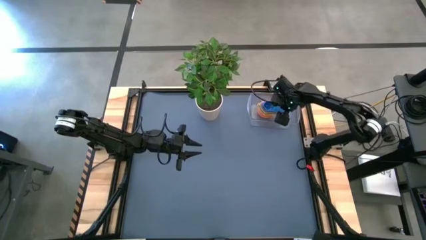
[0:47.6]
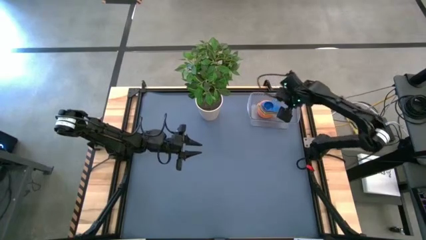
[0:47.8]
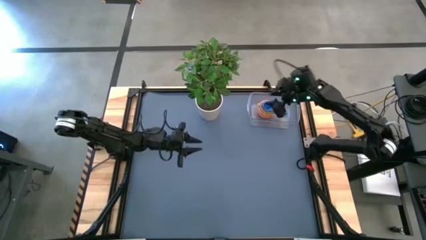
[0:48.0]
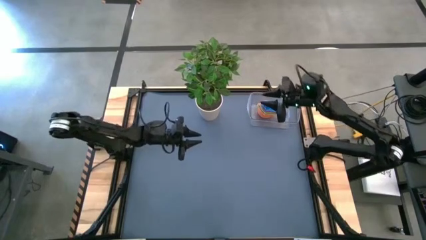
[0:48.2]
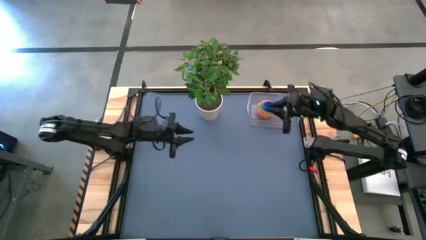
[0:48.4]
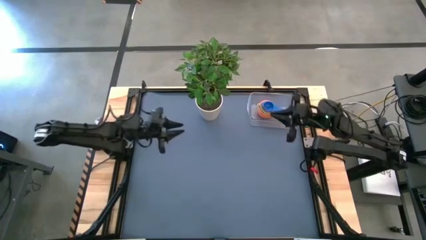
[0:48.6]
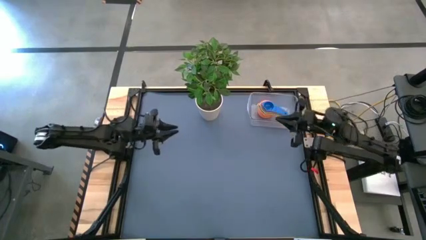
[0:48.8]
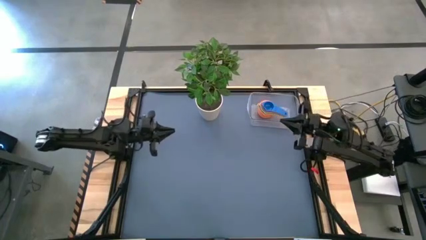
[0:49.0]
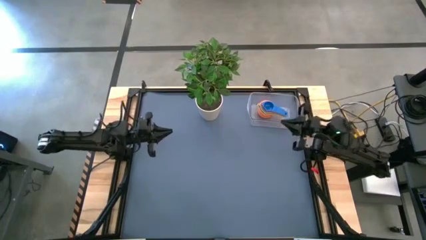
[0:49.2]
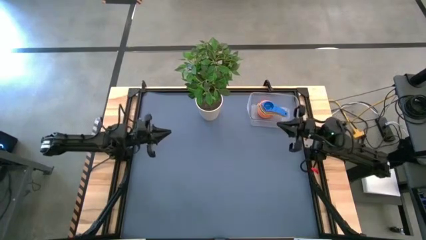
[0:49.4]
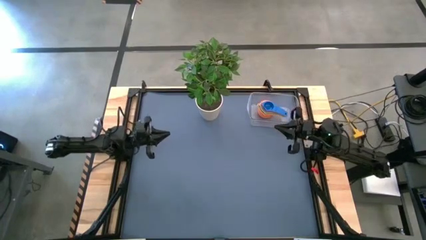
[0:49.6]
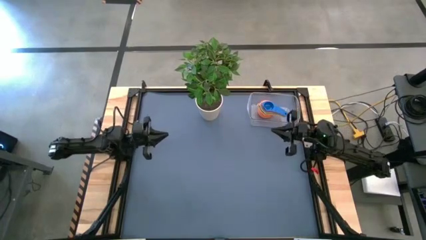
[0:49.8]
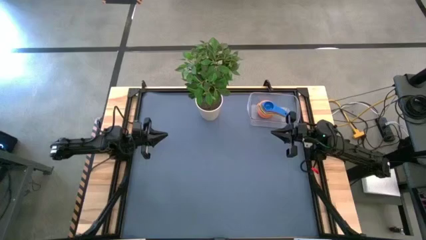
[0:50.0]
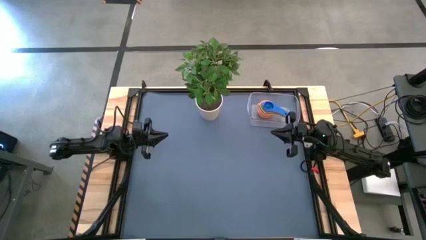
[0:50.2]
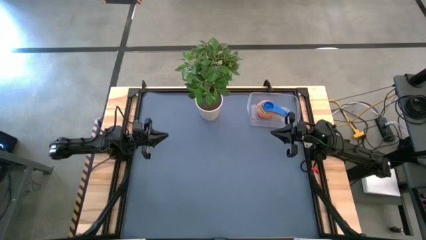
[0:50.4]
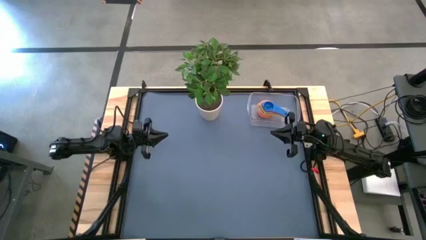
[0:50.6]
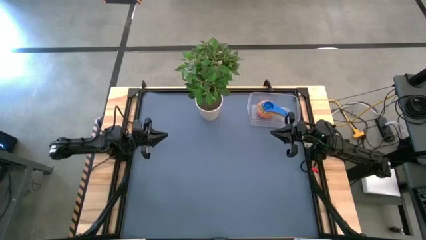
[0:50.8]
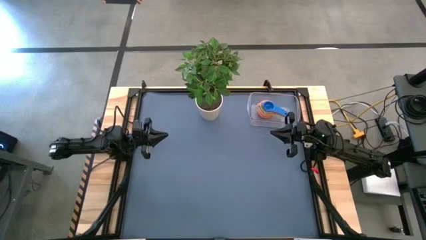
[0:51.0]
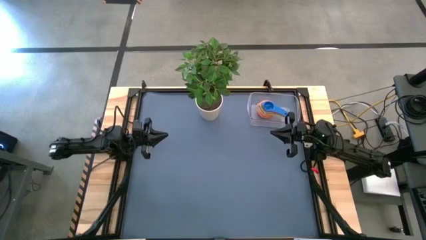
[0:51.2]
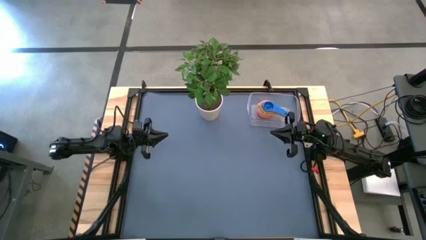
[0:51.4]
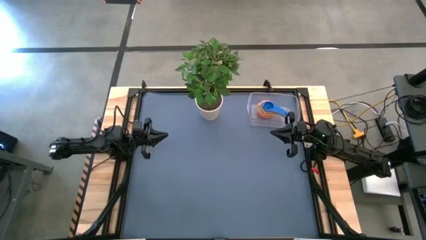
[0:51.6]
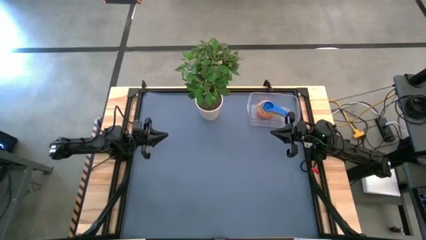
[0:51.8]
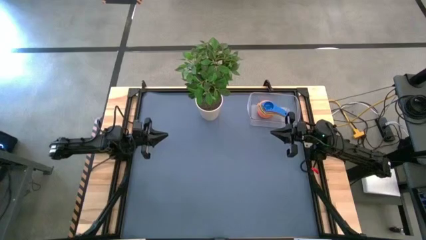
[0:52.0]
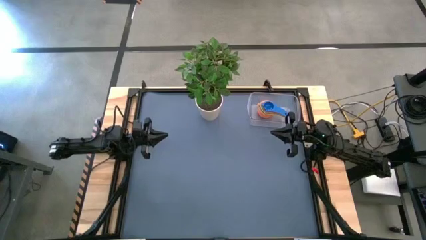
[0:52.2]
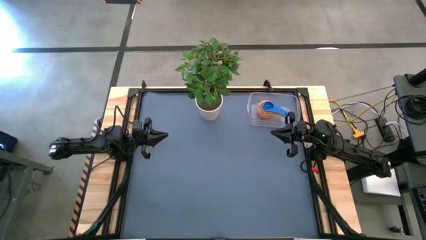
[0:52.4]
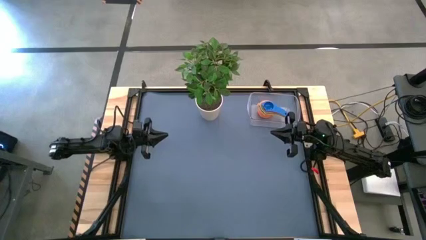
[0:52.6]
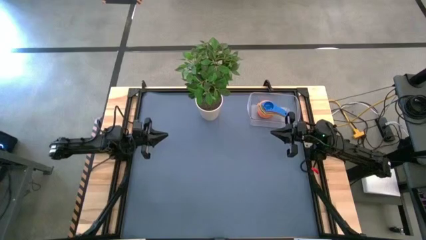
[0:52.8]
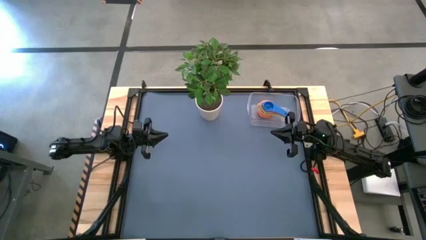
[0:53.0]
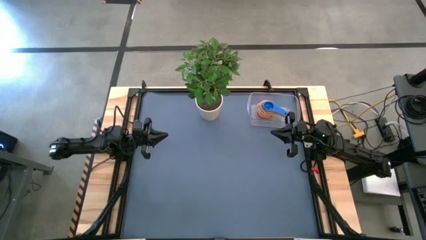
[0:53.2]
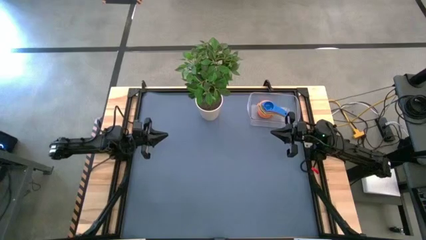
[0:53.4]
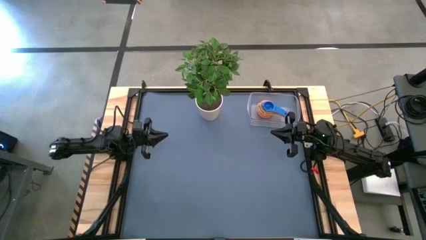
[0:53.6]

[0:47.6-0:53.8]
Task: Nest measuring cups in basket
Return to Home Position

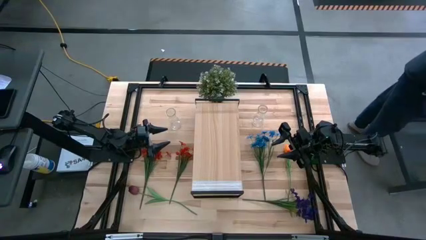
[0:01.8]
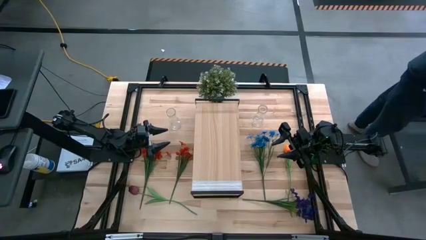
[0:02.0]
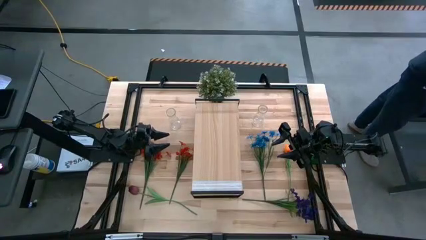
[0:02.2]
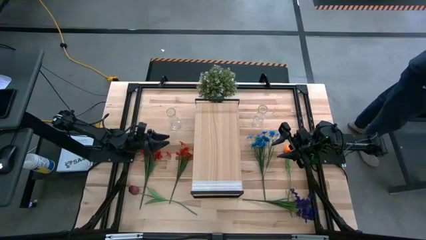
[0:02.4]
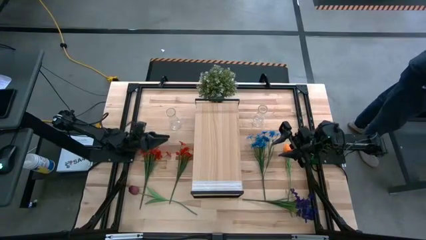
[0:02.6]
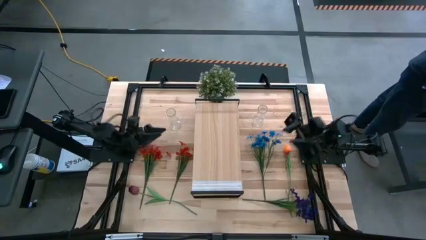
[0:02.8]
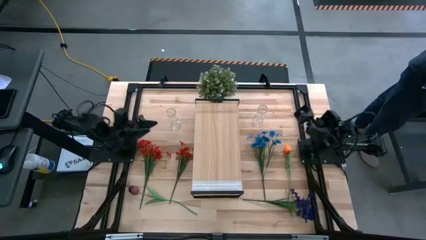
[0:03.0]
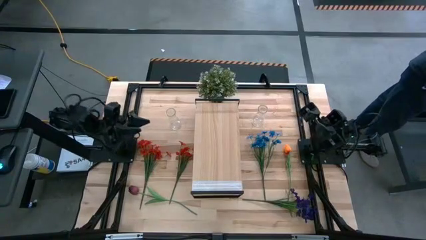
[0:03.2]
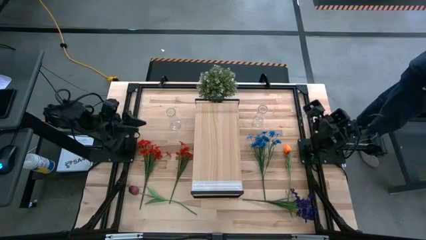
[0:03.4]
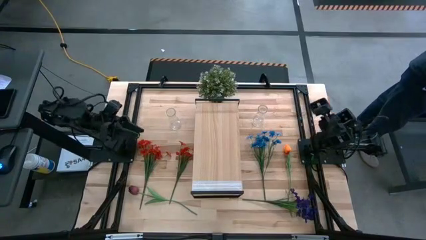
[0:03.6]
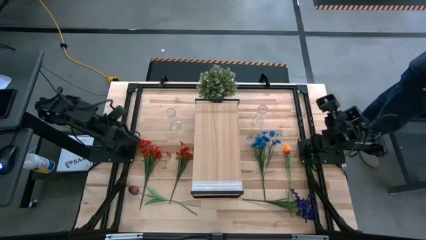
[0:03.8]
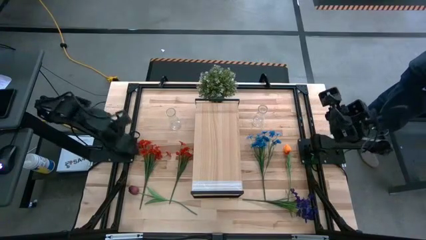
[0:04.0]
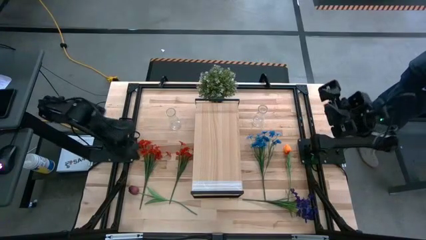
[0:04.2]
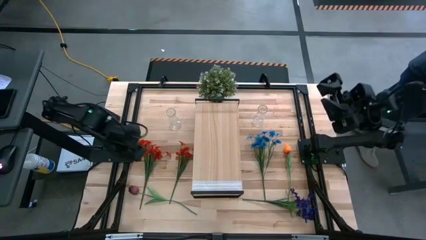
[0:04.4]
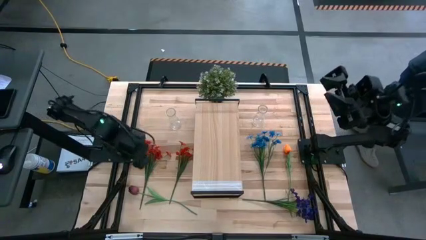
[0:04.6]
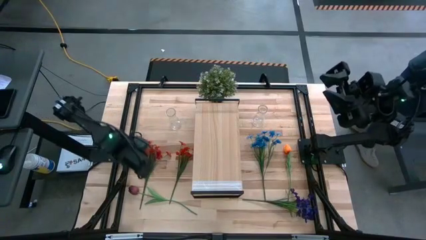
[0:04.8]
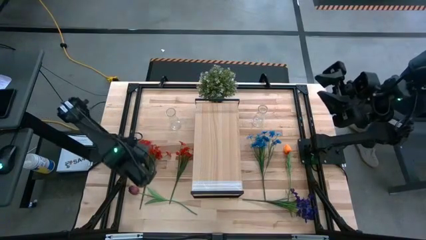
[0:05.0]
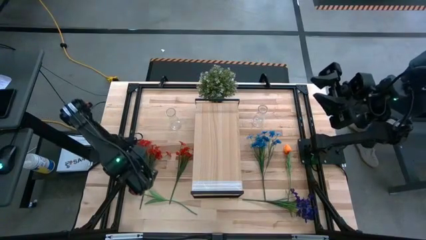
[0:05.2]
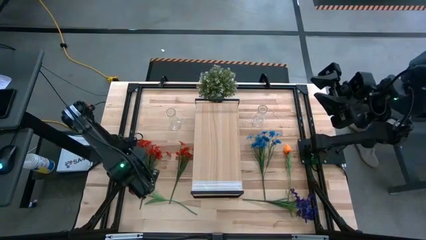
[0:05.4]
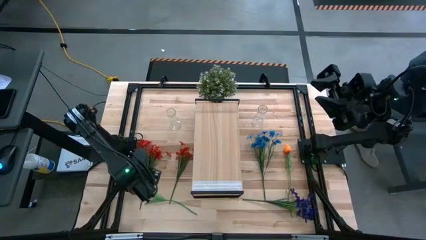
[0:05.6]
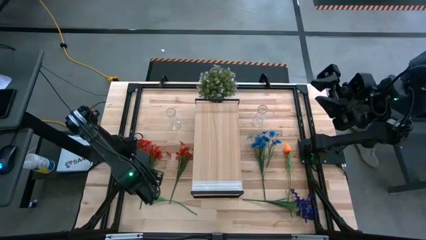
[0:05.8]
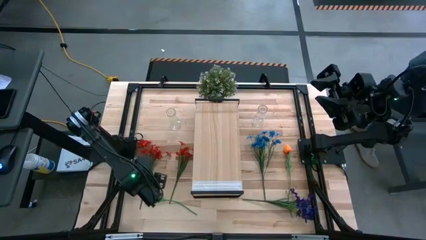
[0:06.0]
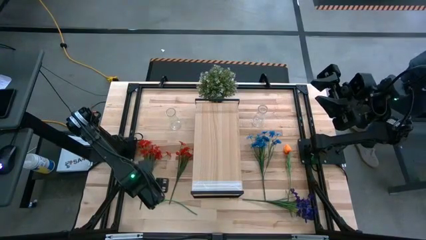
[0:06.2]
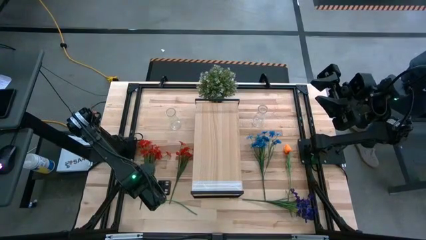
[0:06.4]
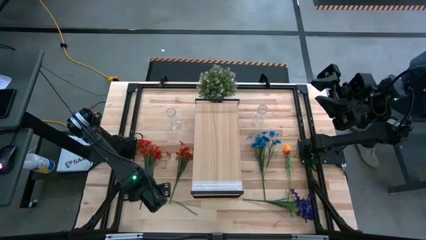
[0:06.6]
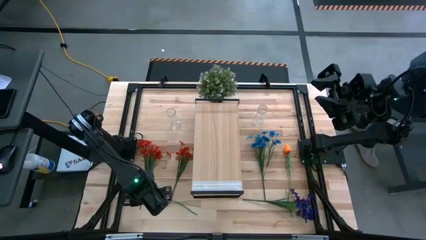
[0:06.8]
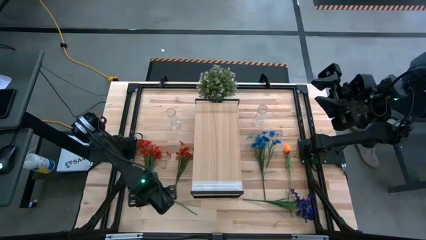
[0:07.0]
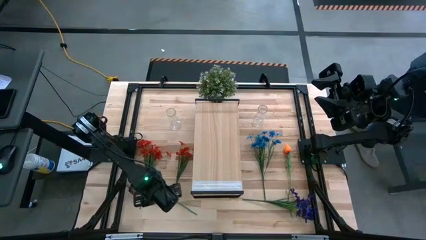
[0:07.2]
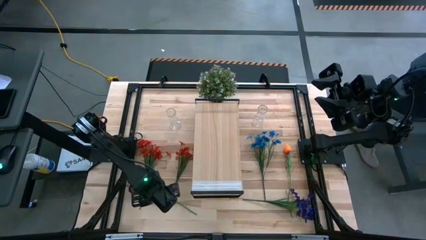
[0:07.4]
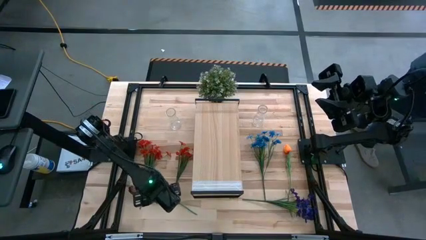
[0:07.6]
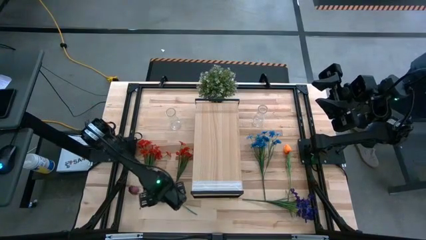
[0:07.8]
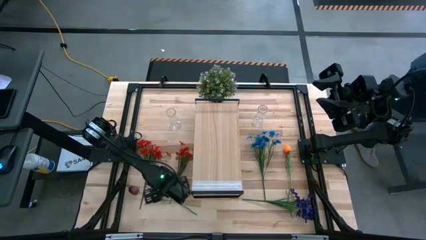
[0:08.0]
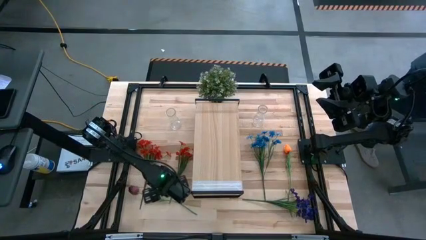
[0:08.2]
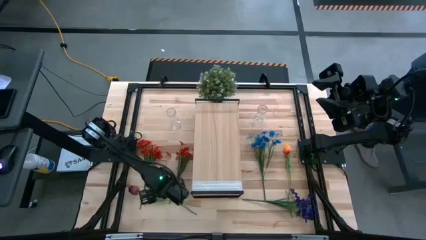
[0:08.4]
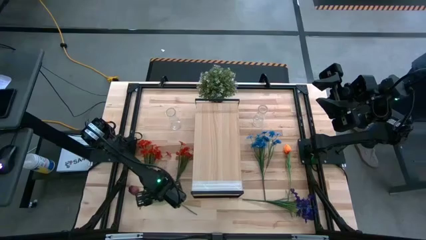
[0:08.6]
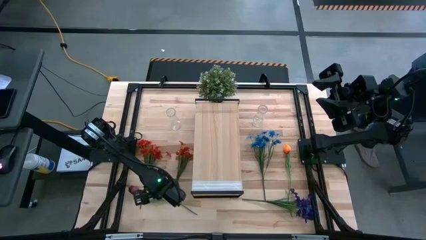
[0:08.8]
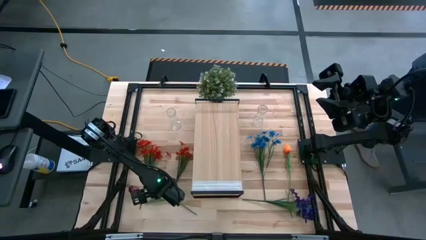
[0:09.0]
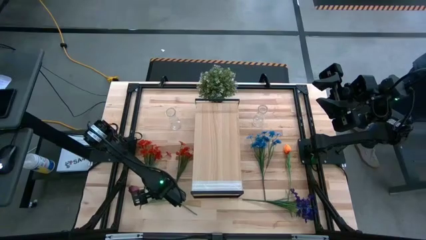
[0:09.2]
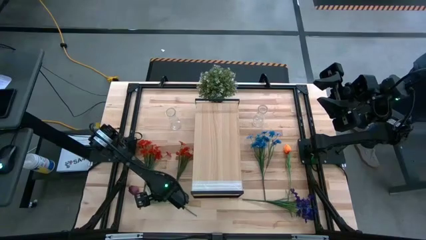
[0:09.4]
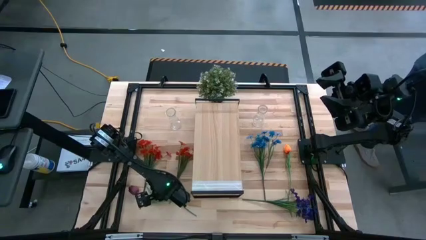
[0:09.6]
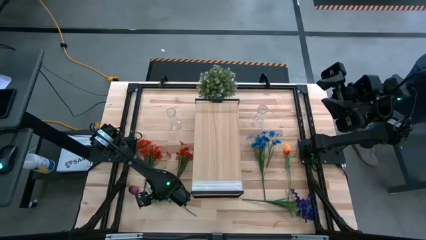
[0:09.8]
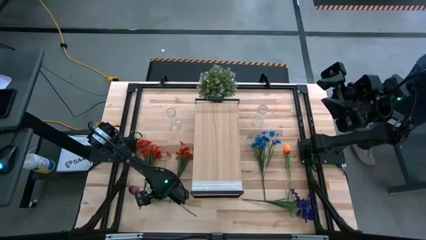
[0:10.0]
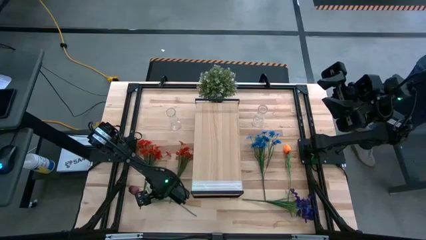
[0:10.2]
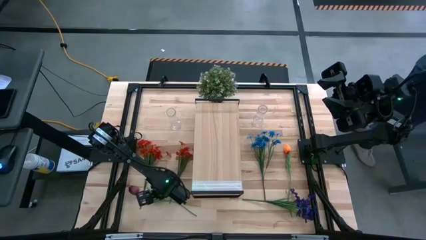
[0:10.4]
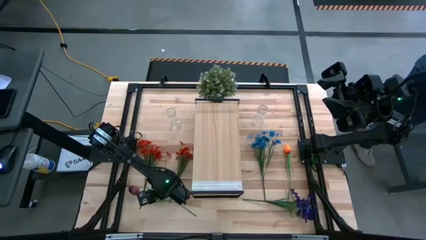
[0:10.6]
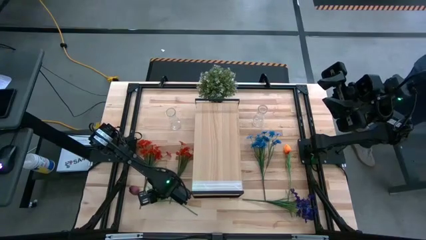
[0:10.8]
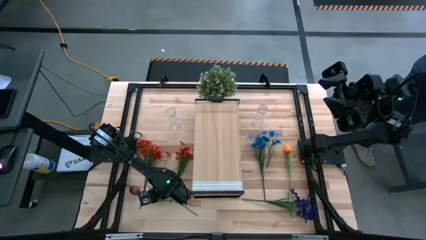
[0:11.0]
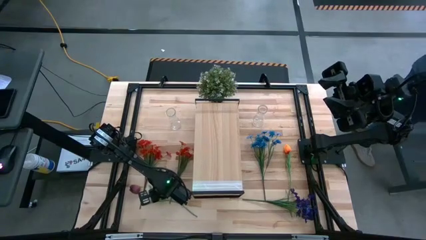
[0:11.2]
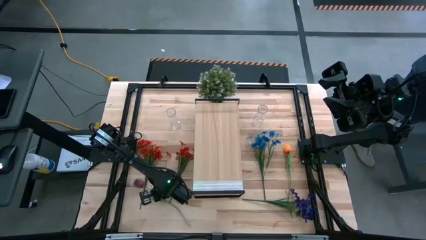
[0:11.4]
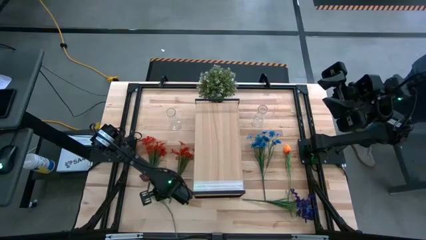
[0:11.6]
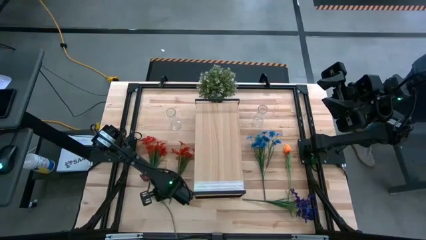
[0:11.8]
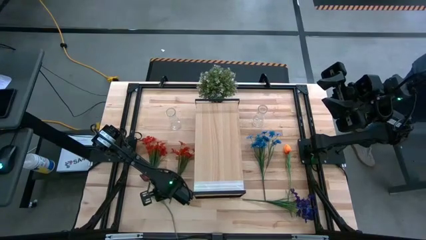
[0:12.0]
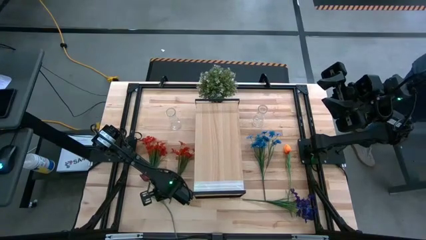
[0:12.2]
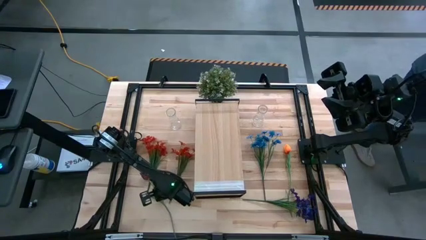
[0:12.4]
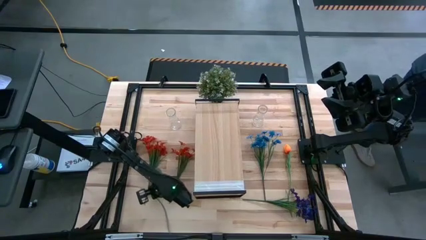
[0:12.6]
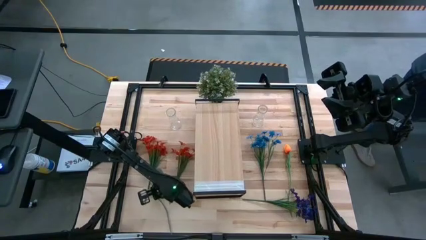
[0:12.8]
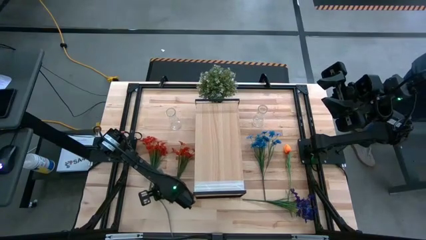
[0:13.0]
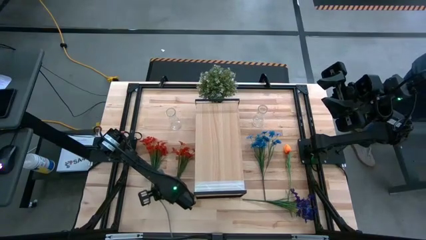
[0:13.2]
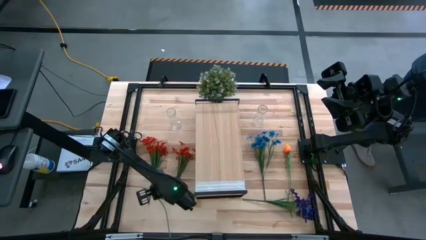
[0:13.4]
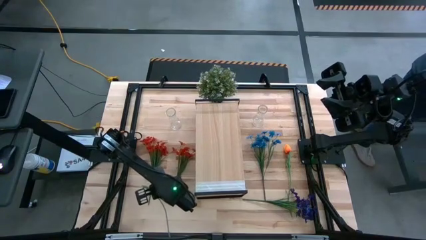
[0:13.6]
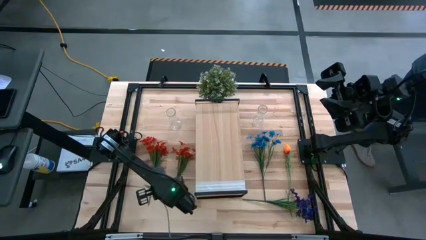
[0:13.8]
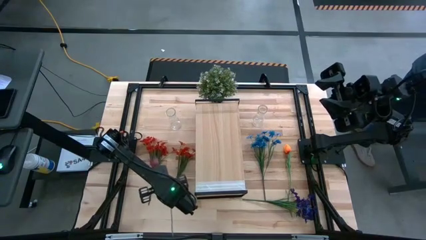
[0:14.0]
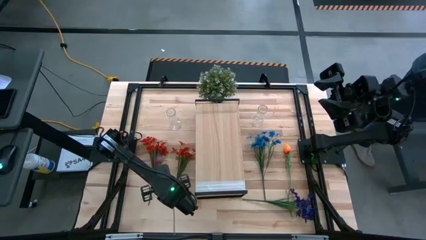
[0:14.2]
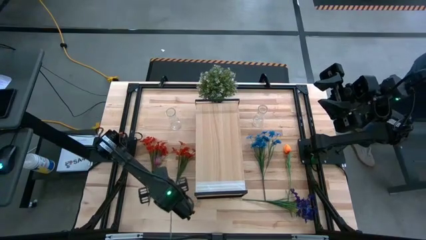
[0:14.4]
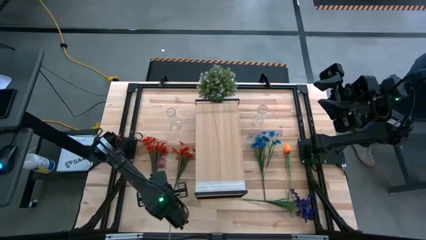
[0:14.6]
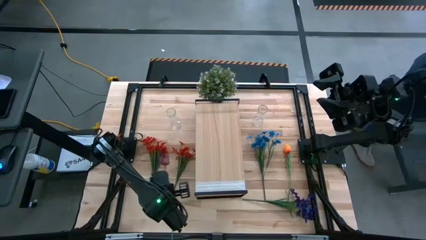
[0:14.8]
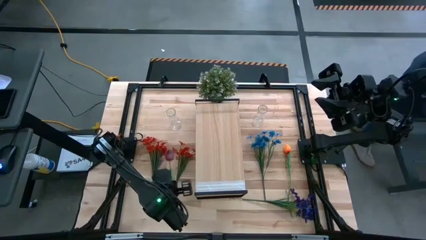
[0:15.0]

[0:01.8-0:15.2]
Task: Pick and place flowers into a vace then onto a shelf
Put the red flower into the left transparent vase
